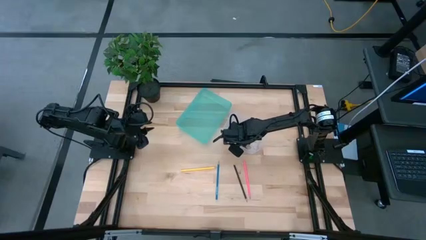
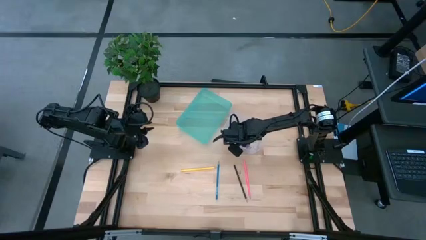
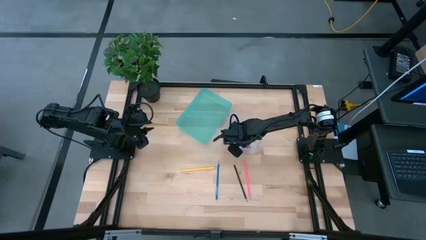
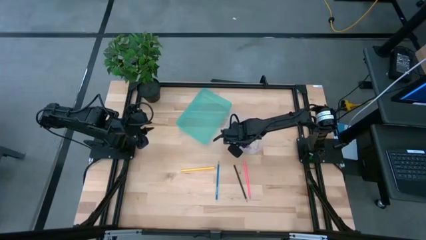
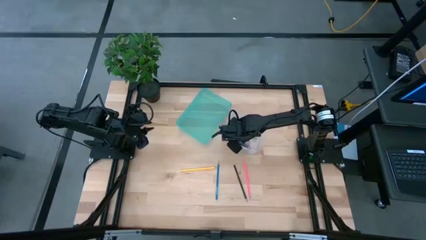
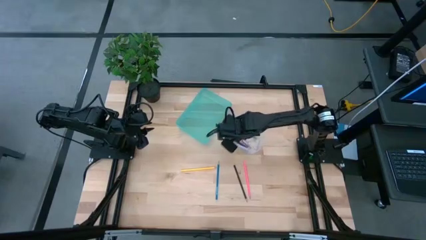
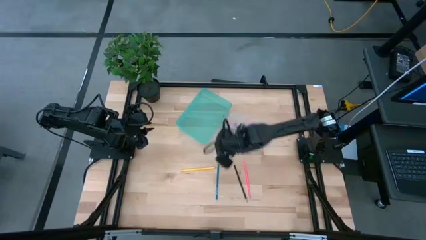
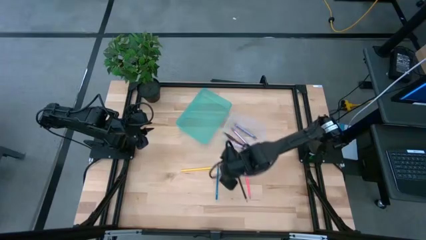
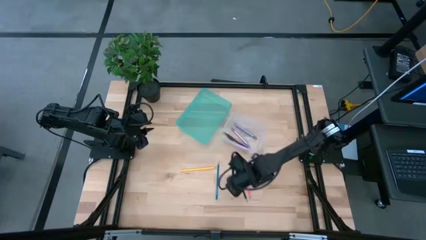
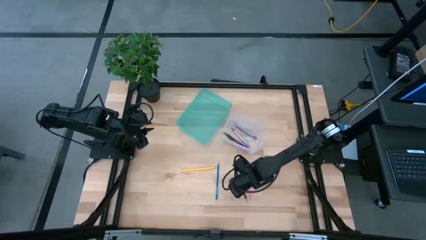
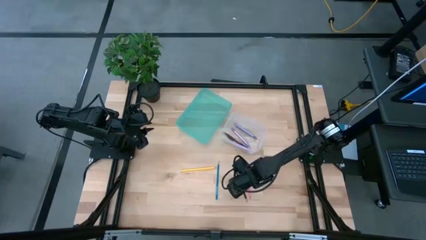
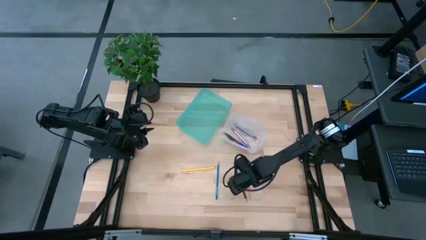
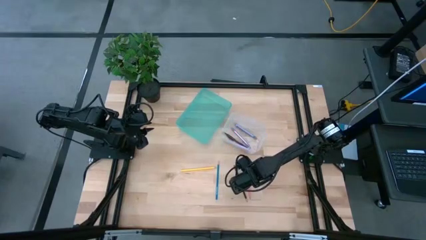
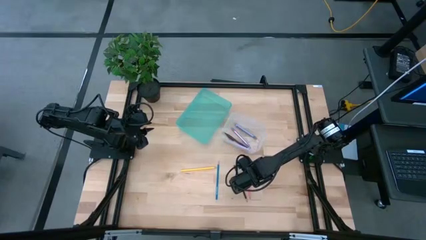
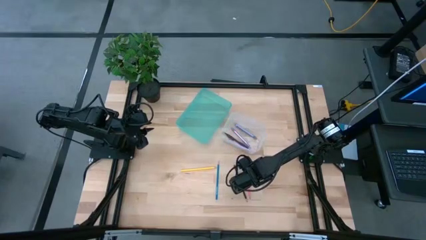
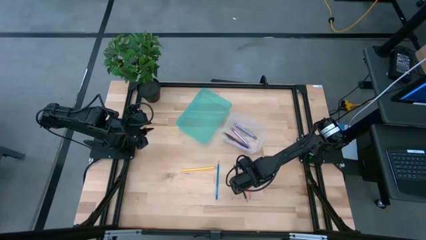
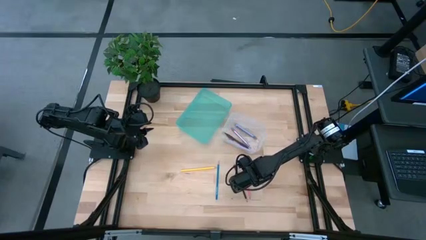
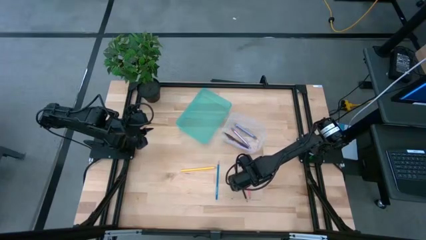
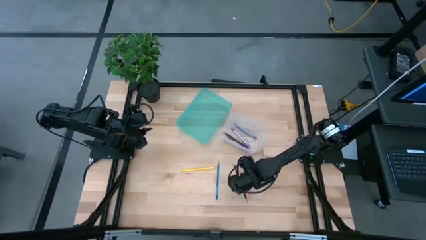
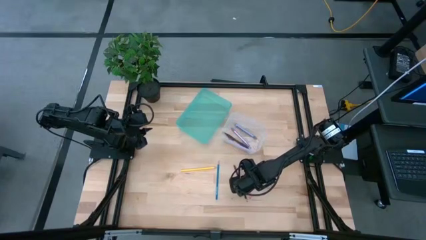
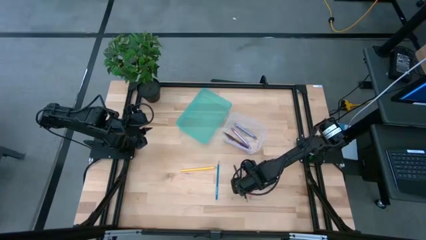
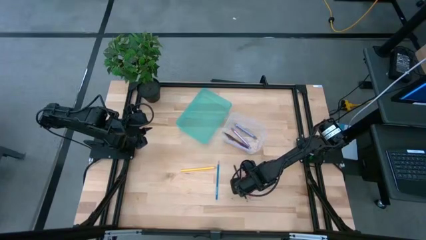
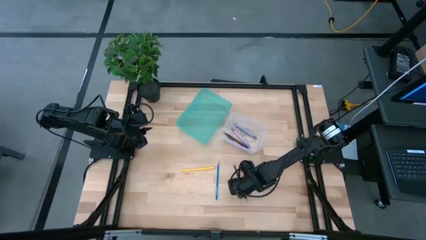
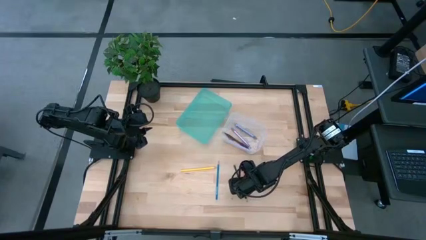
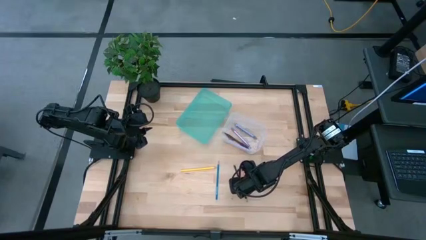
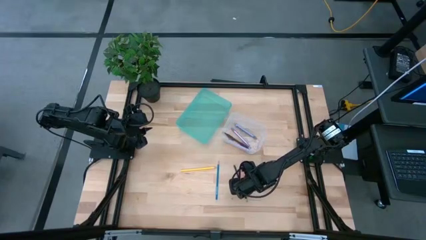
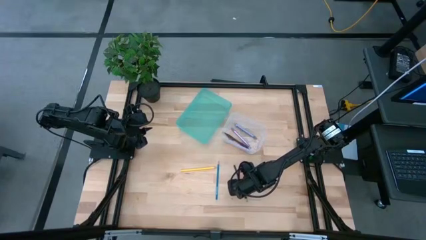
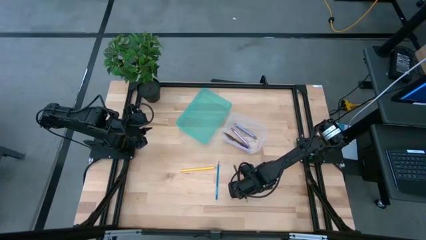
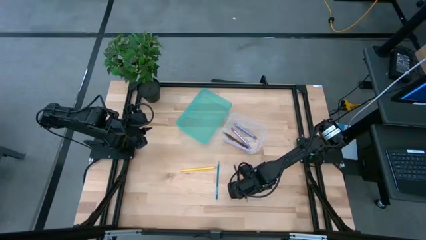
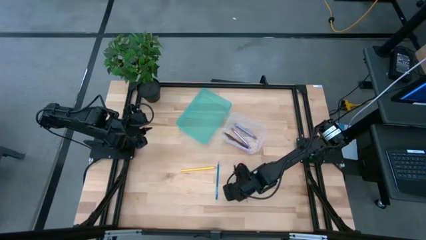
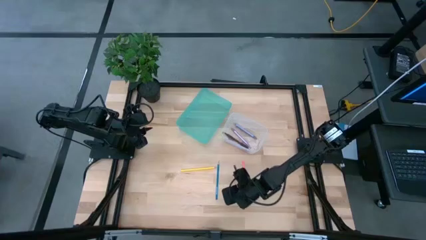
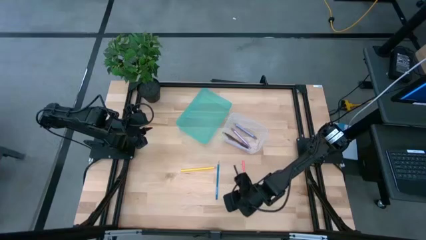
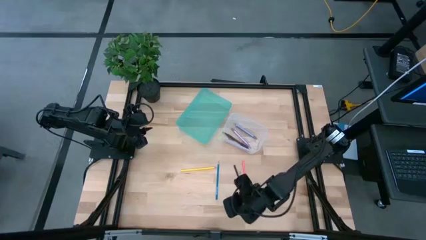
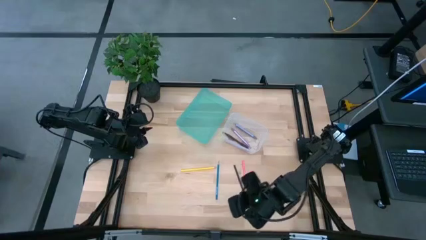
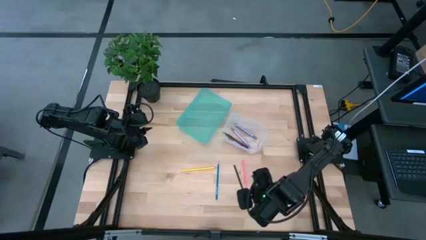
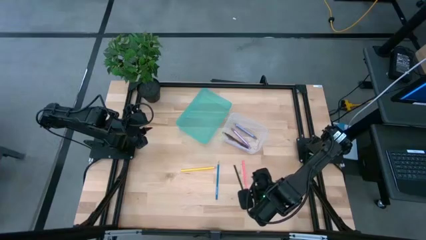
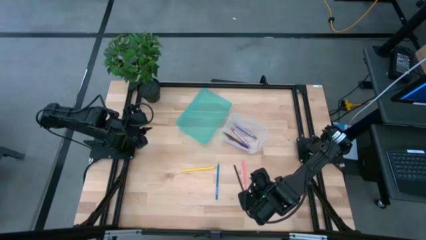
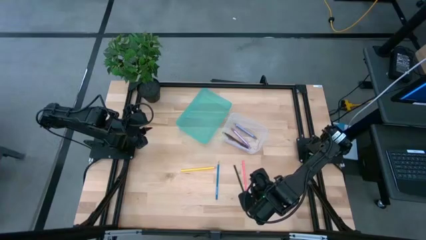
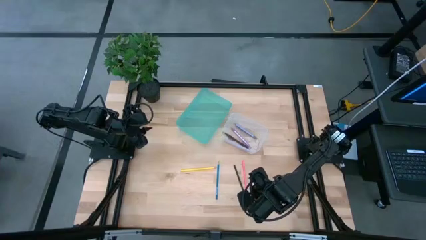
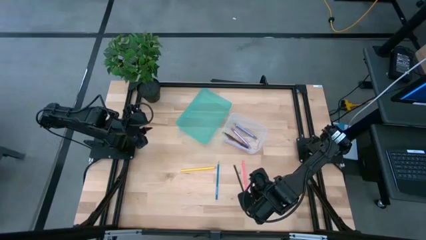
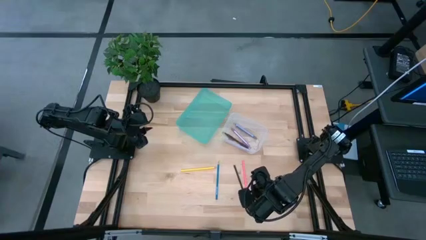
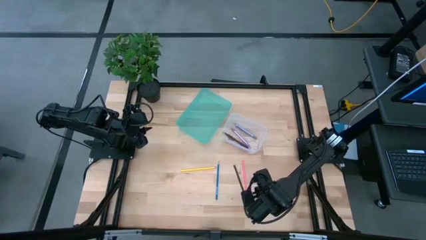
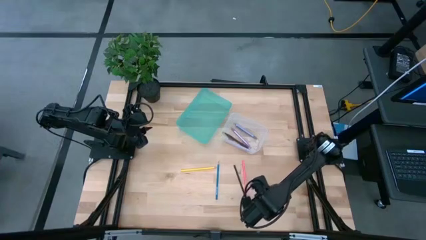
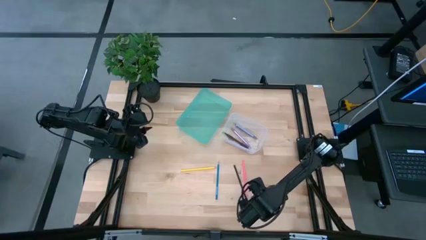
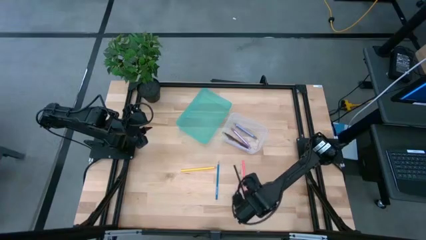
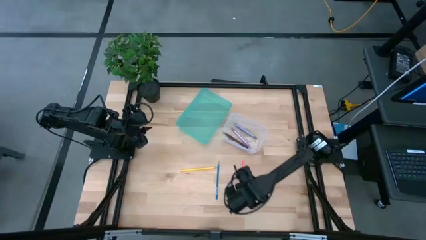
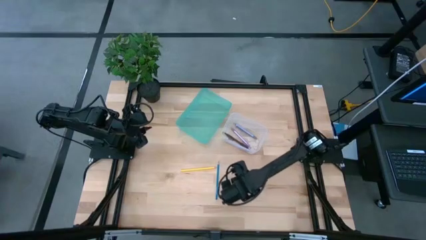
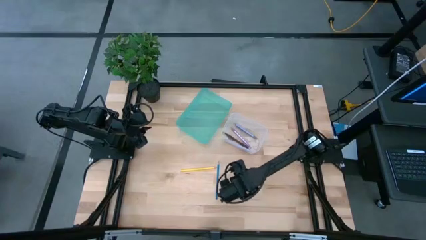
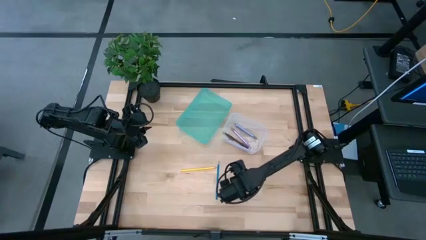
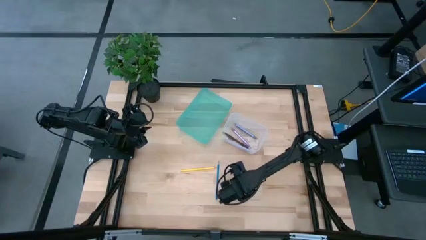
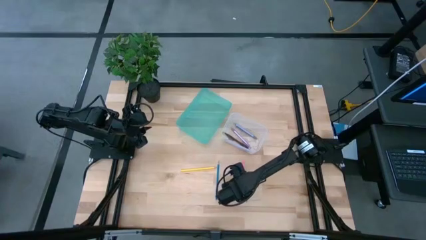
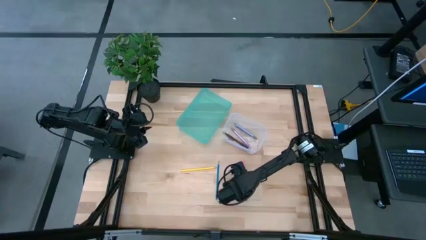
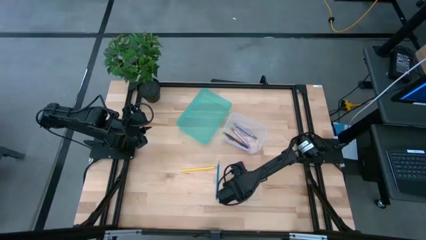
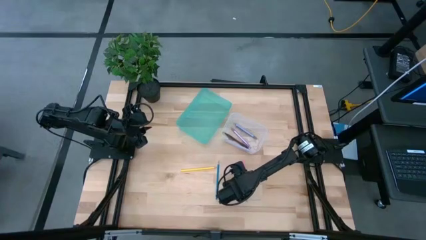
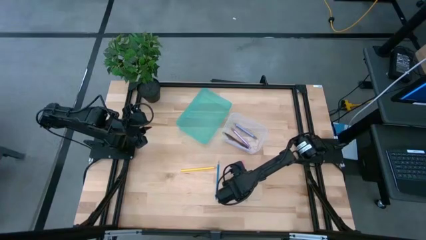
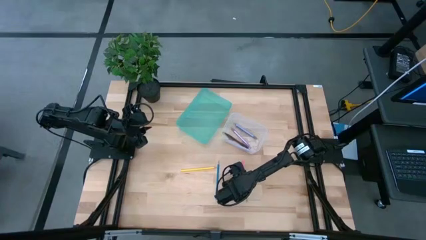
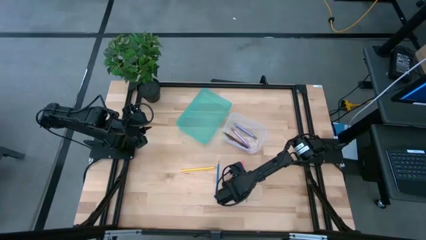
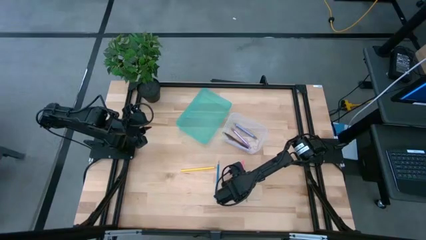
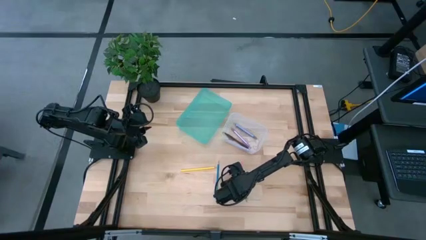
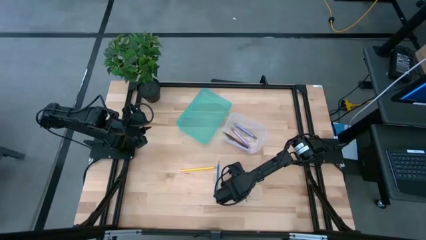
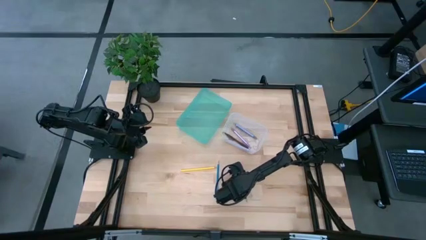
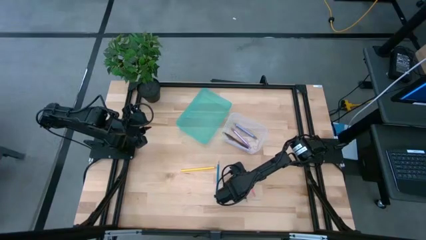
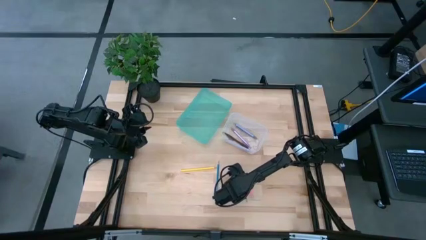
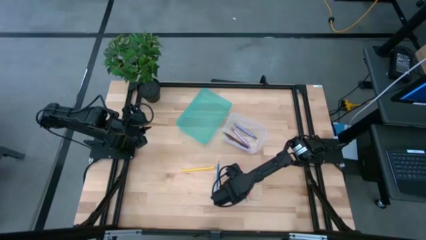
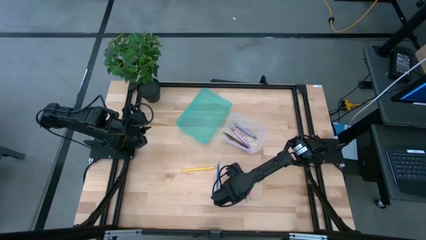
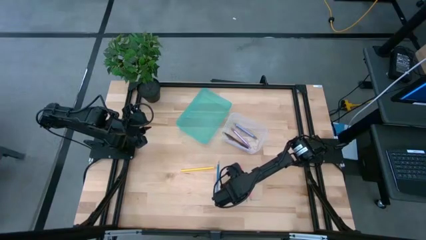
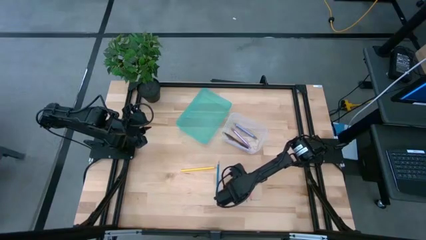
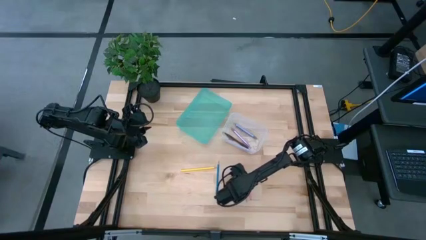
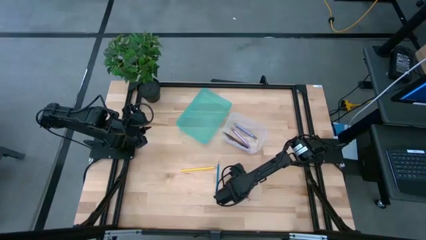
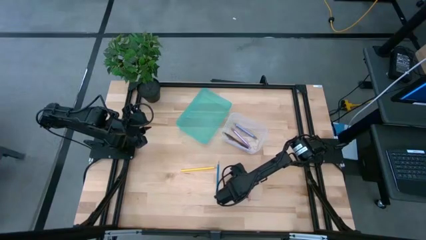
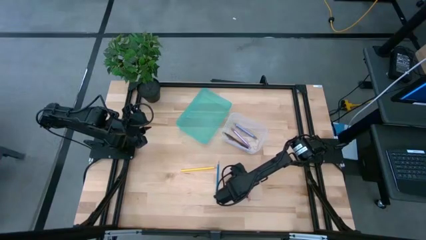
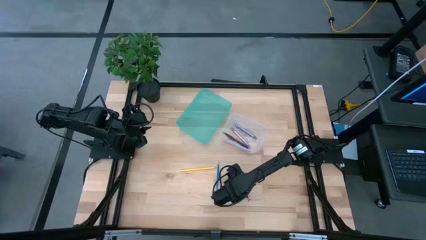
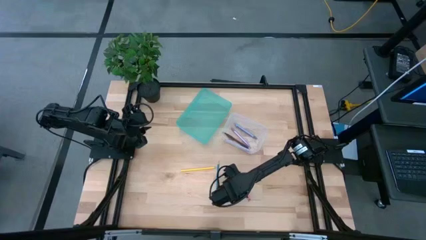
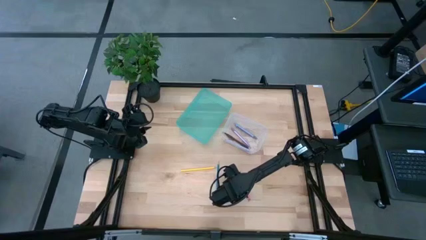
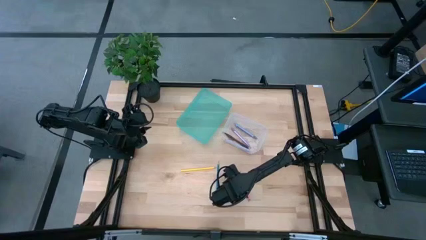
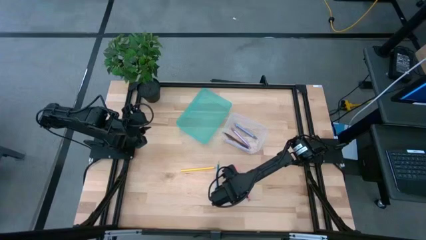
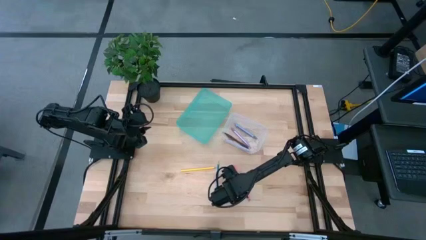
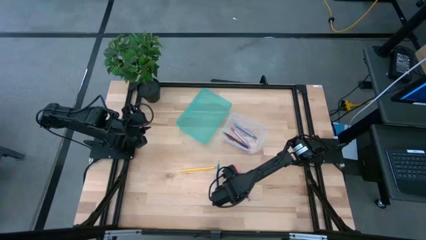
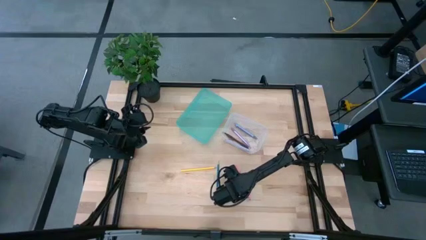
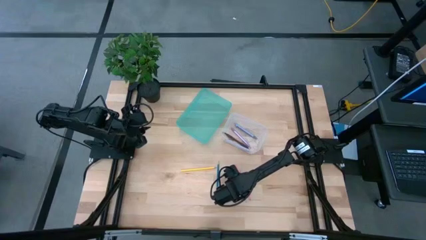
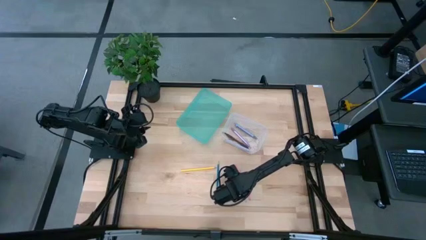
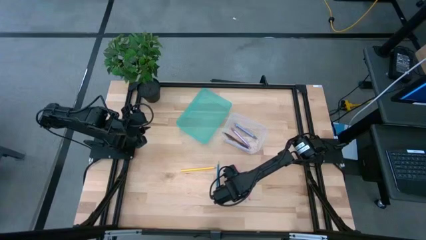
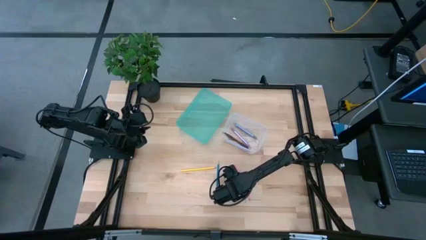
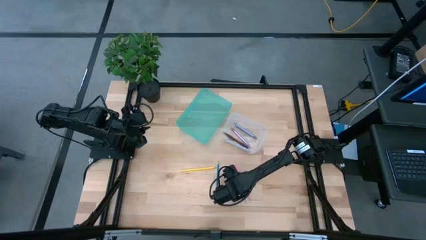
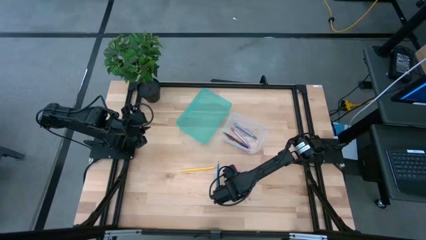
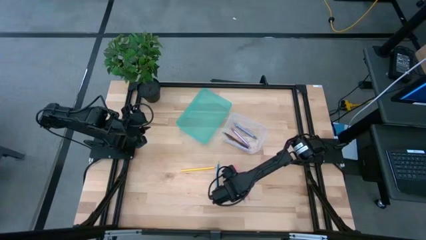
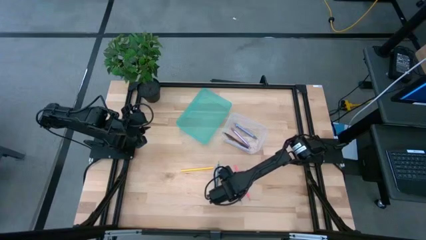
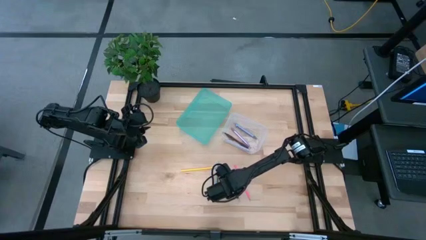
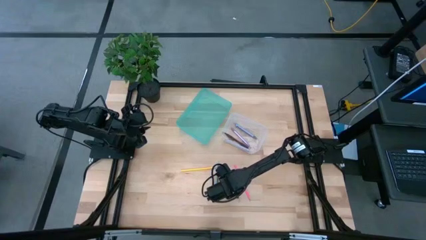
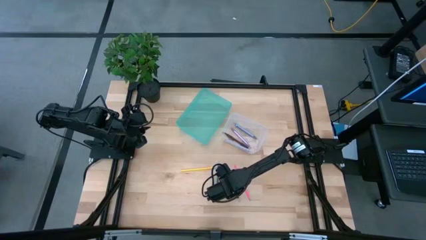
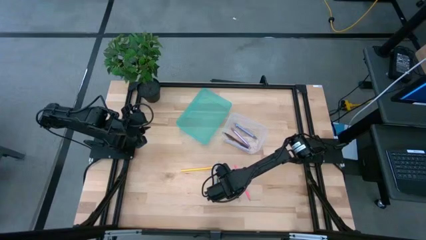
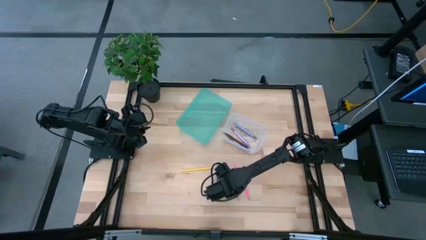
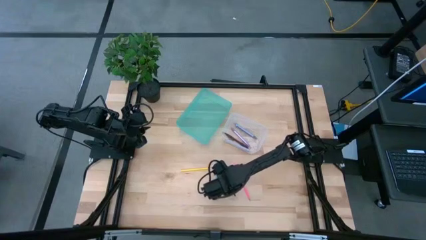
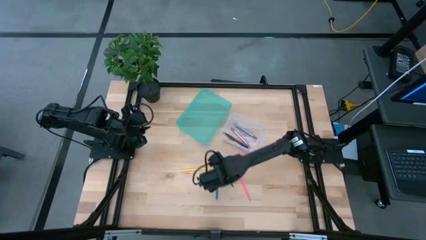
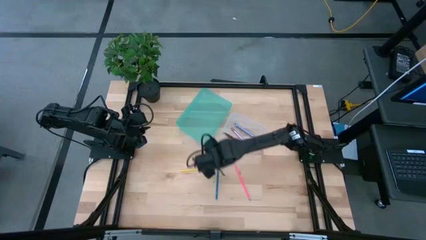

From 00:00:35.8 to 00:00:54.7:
Task: Sort pens & pencils
Put the black pencil into the blue bin
